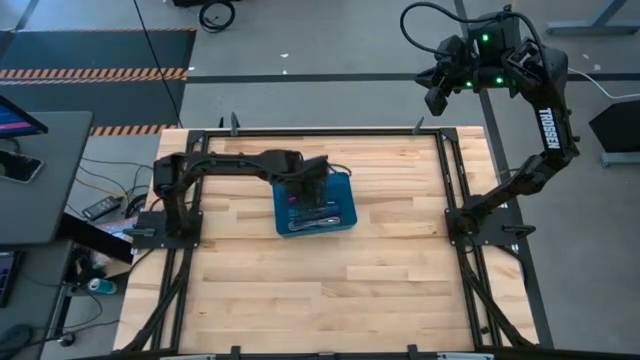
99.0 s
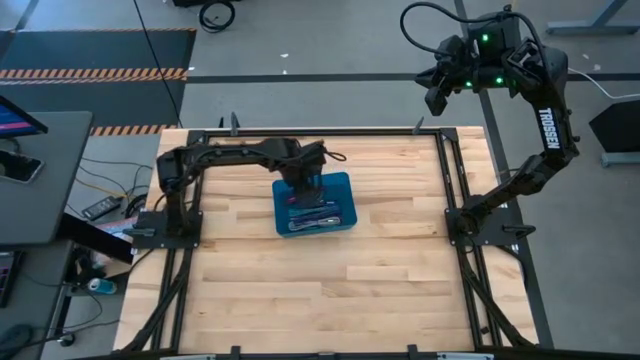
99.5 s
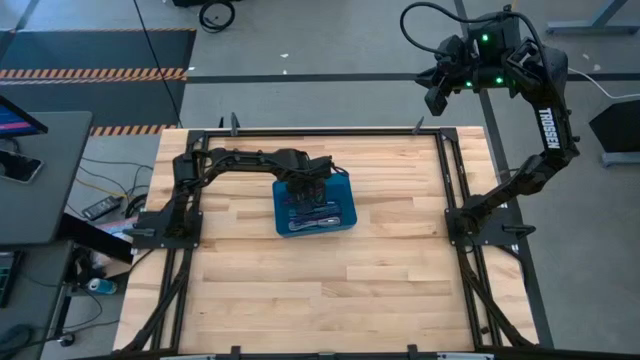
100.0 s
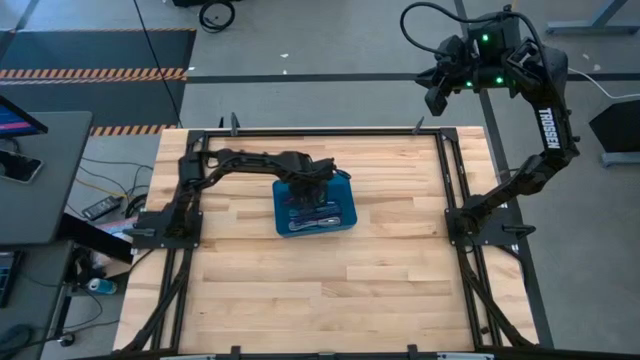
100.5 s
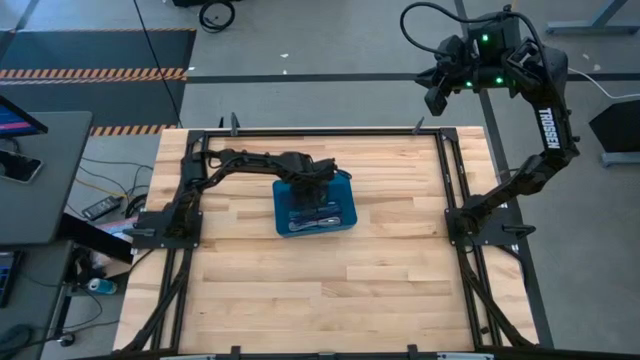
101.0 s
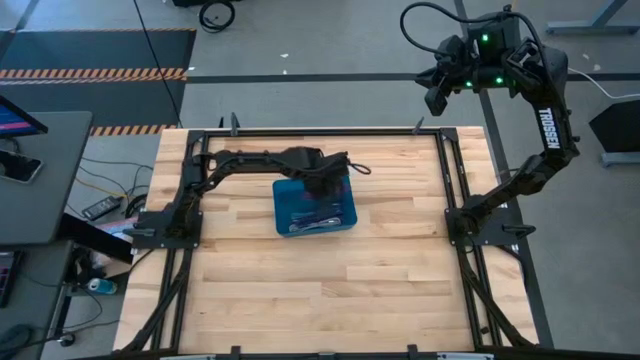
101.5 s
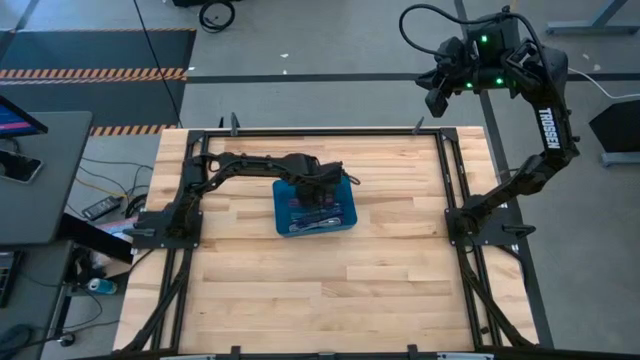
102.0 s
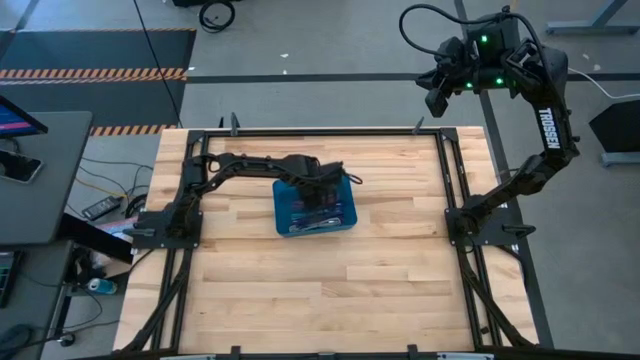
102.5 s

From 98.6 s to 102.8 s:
Task: Pick and place USB-C Cables
Adjust the black pink charger cable in the blue bin

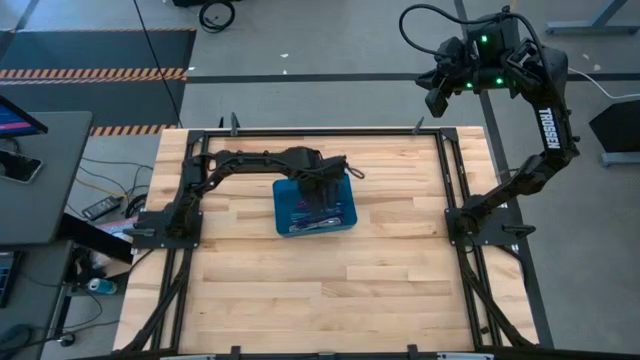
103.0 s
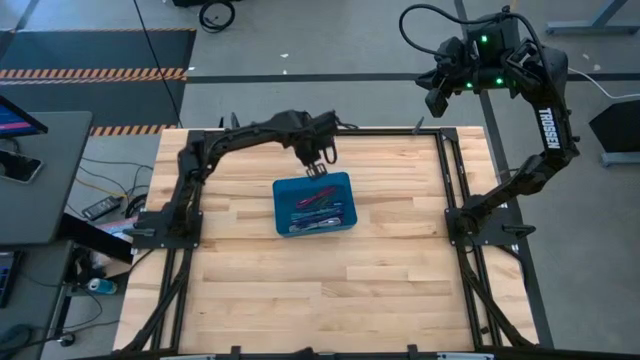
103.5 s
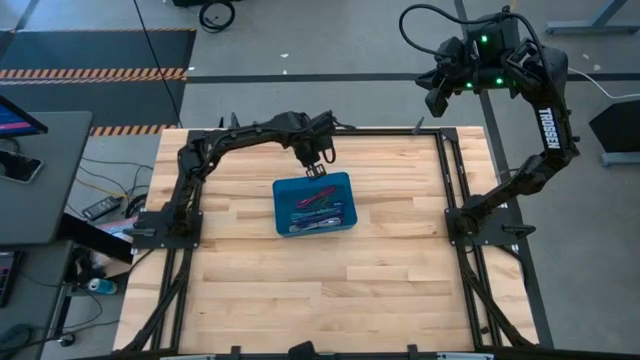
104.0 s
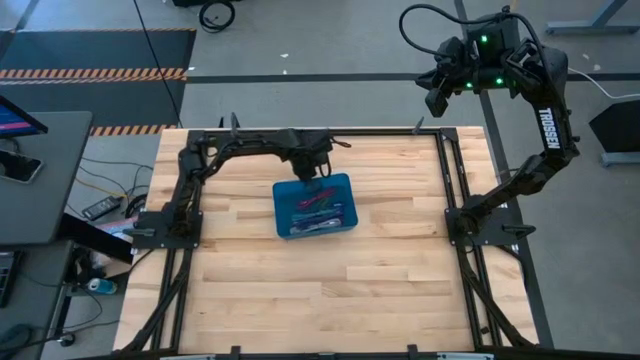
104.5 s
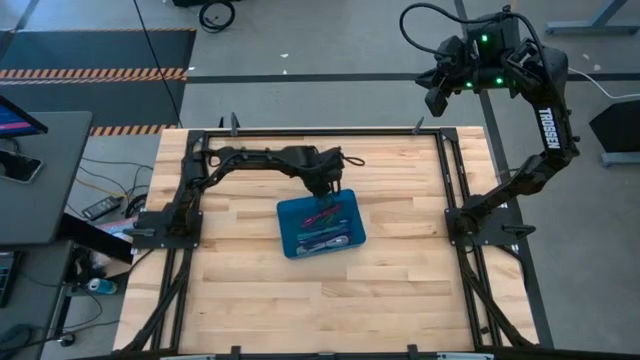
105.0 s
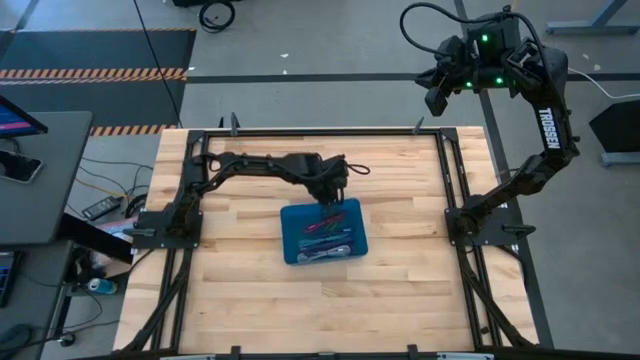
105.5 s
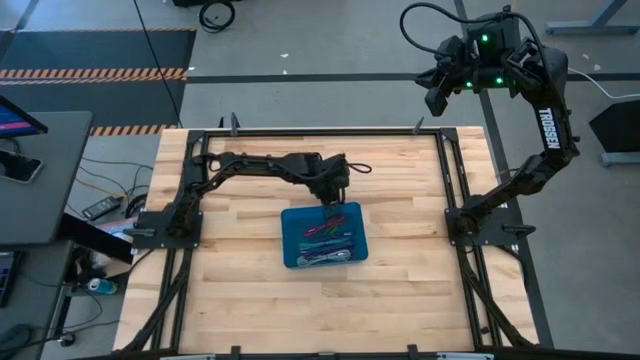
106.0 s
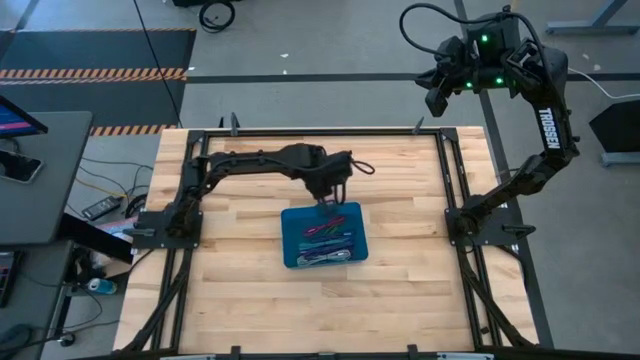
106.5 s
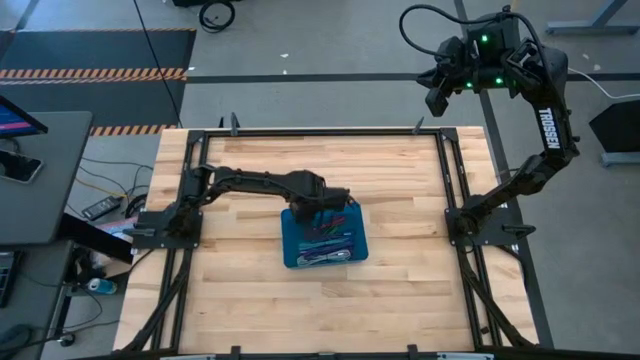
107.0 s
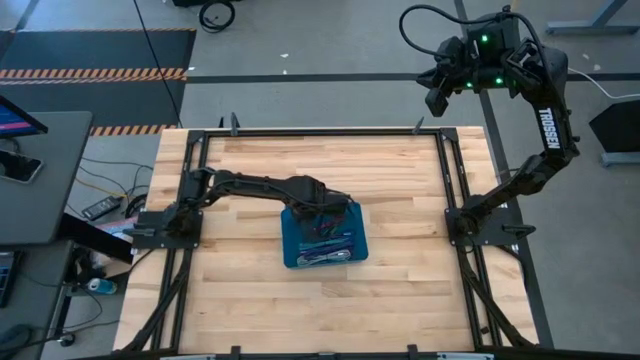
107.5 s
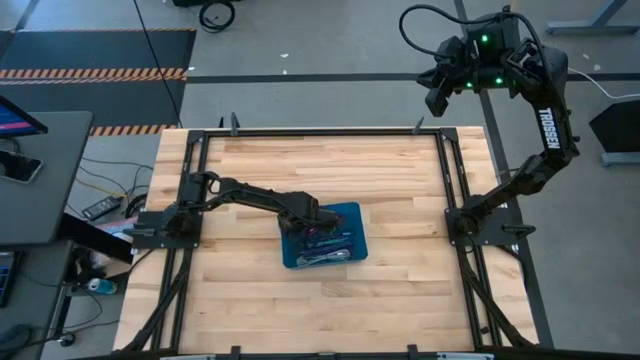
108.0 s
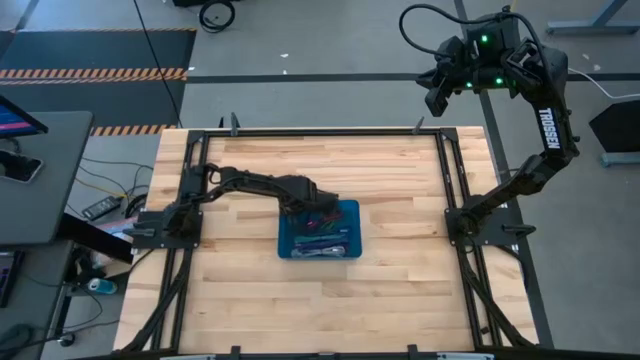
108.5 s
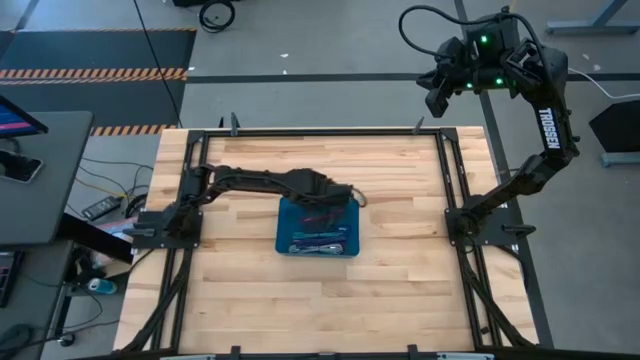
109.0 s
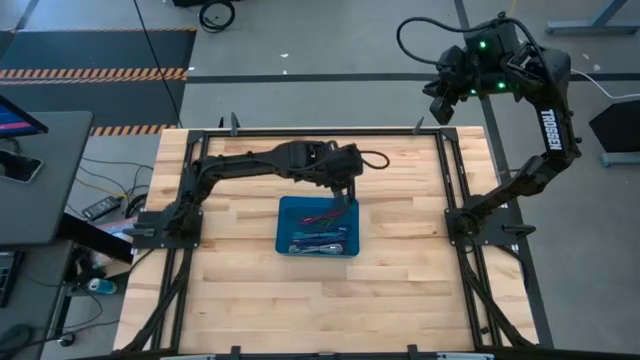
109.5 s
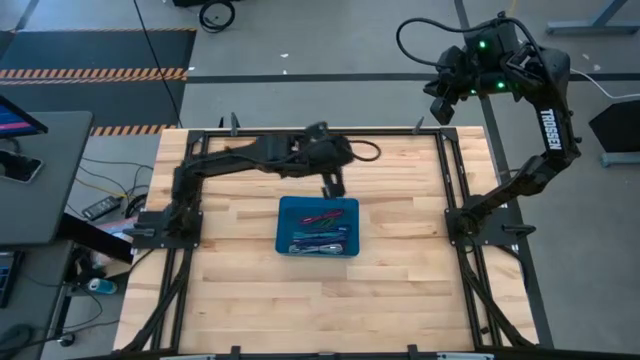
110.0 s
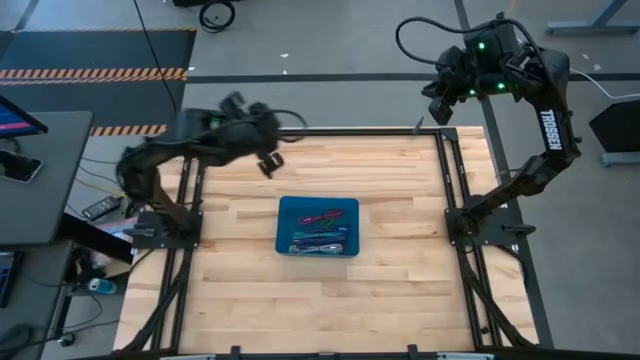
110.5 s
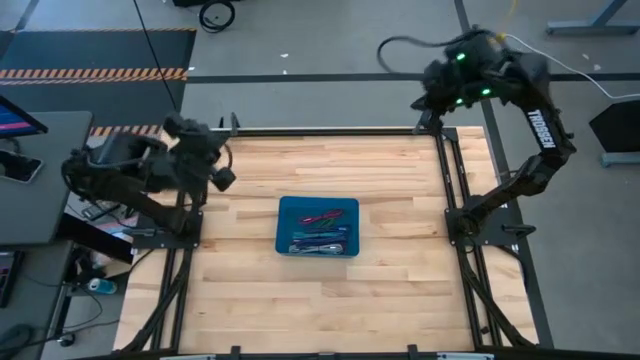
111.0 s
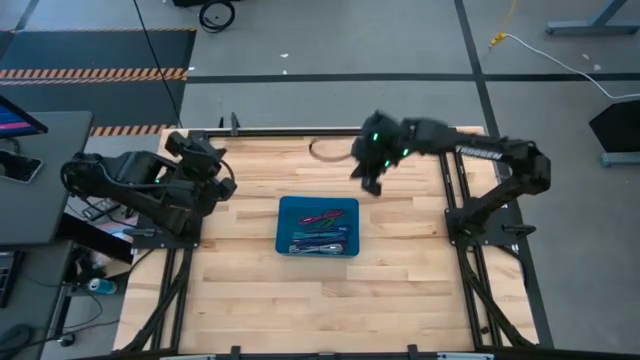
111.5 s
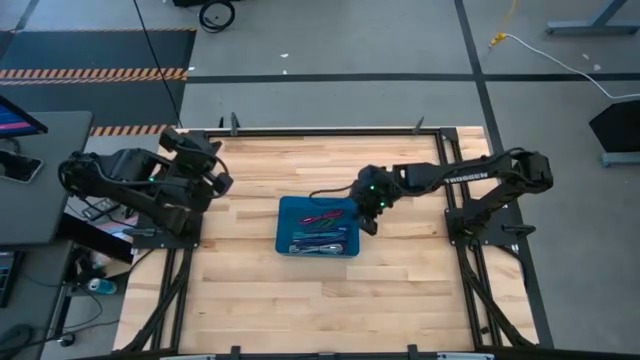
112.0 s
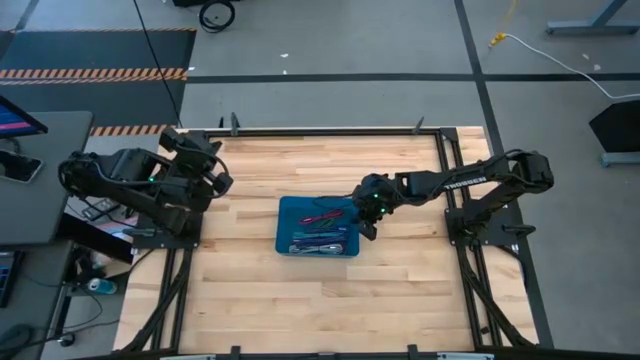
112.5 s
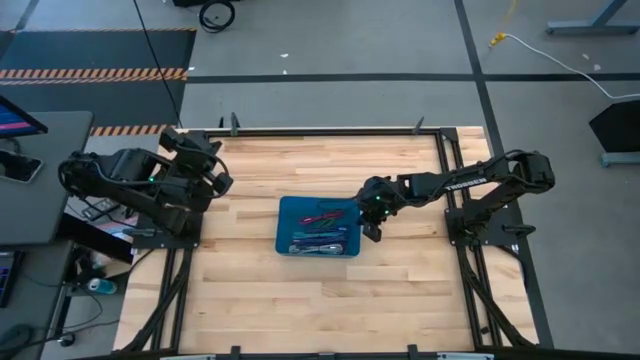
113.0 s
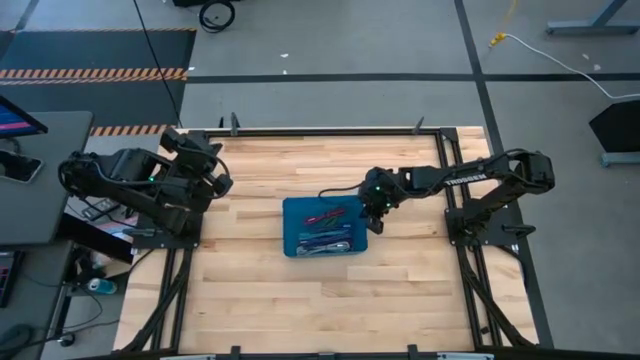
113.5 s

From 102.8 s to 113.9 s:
Adjust the blue bin

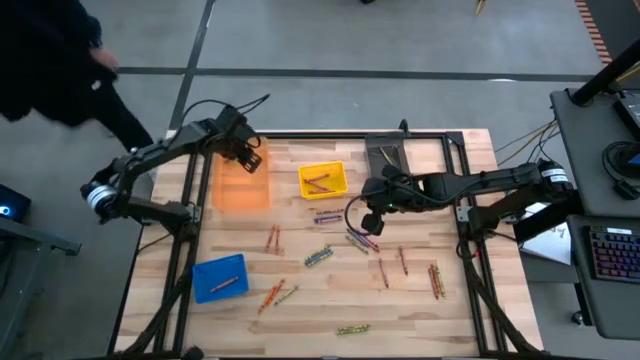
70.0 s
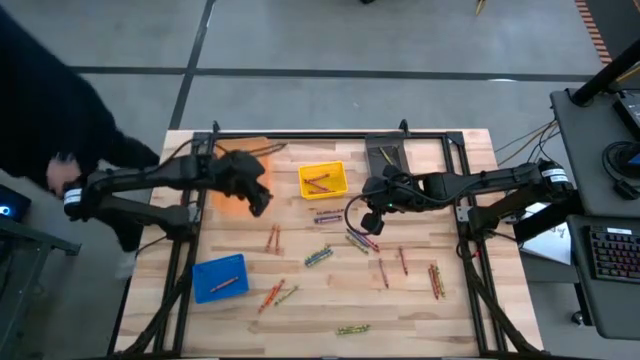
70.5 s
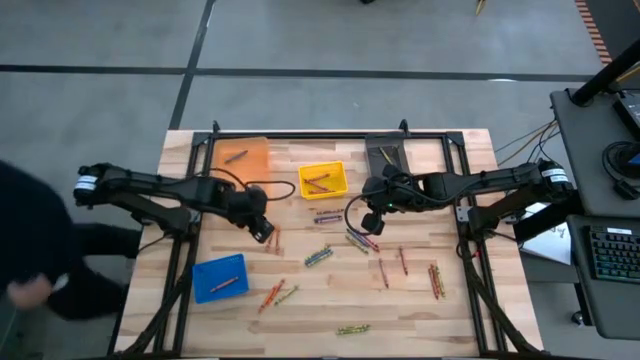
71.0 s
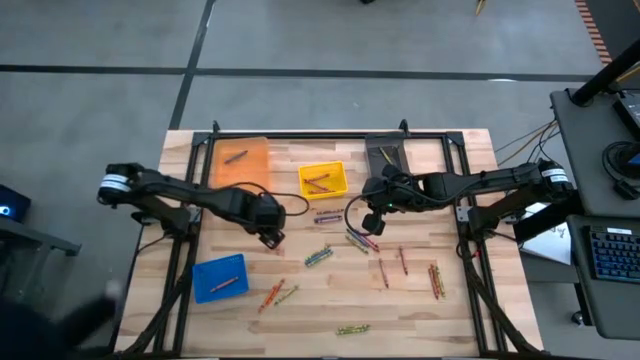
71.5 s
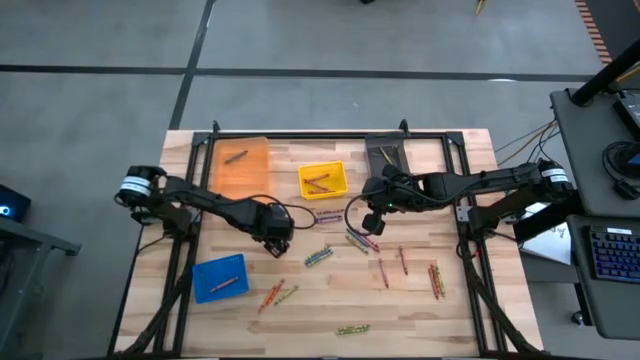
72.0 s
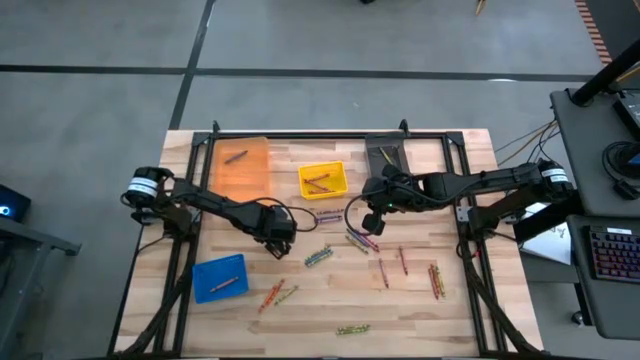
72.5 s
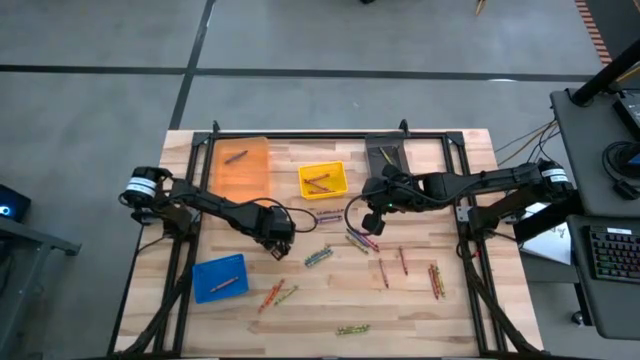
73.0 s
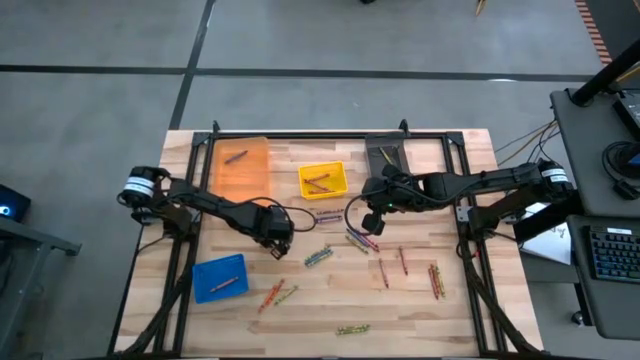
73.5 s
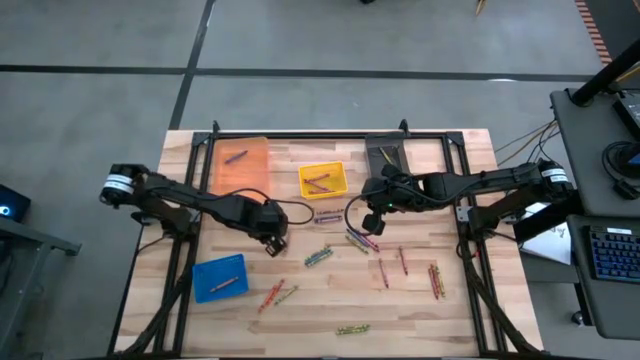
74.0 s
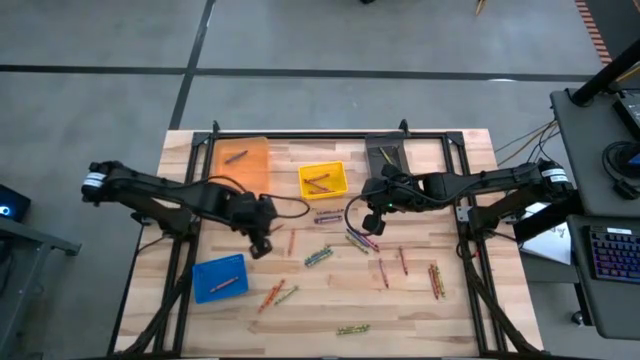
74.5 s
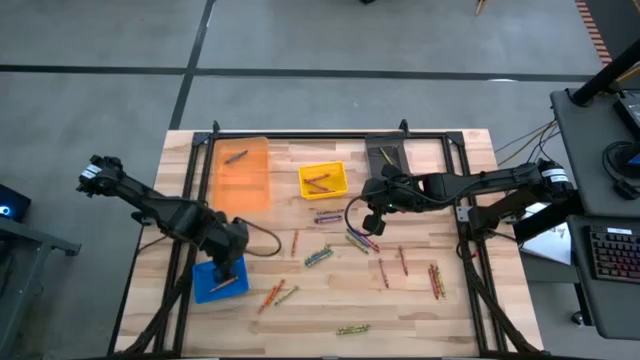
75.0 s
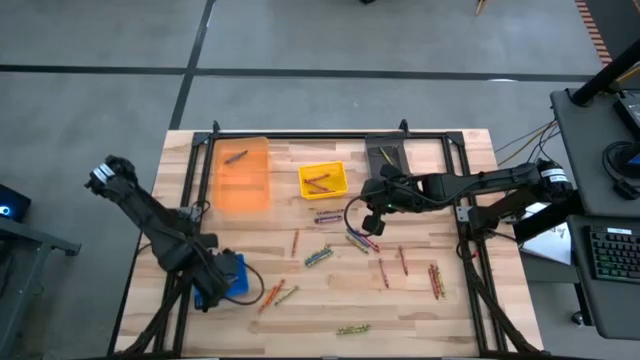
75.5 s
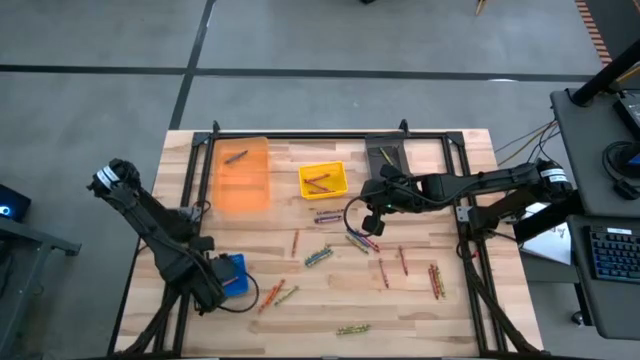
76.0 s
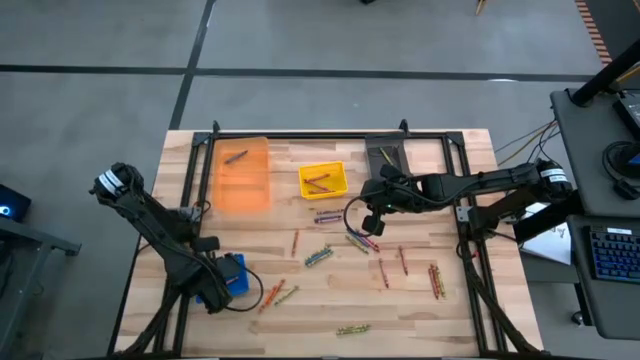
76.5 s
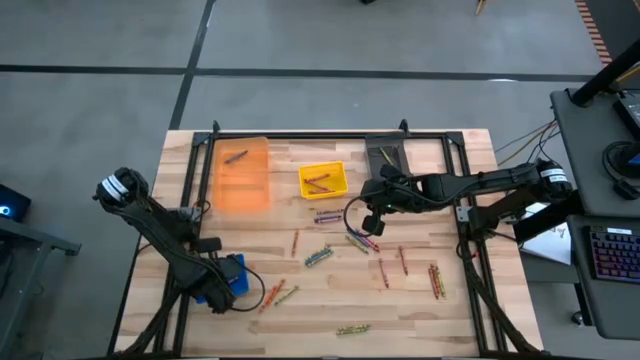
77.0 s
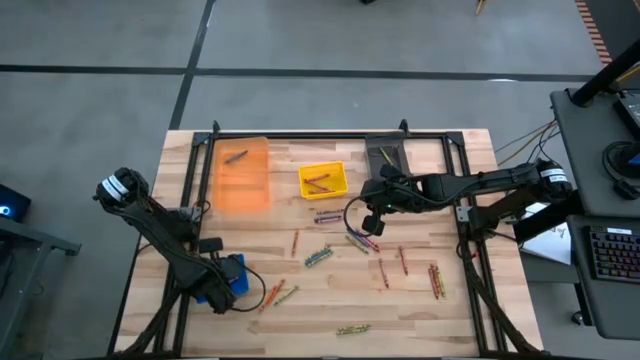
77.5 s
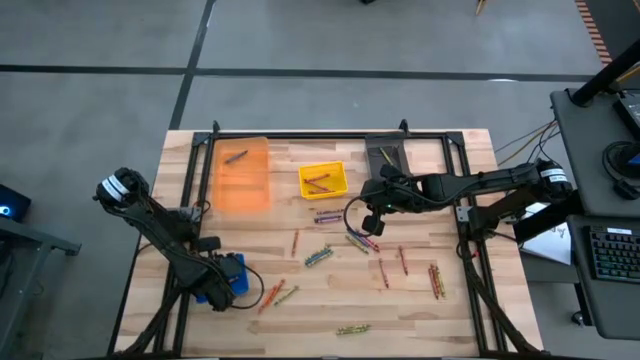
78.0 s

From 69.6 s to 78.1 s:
Task: Sort crayons
Put the orange crayon into the blue bin
